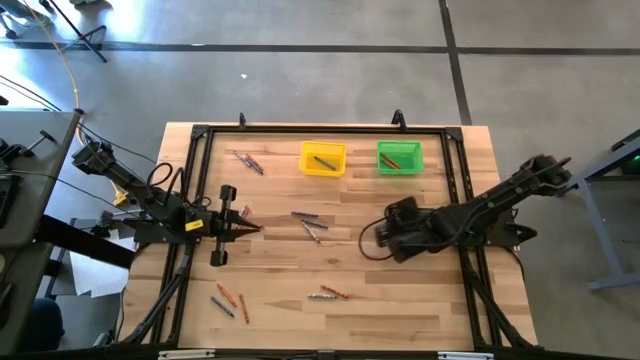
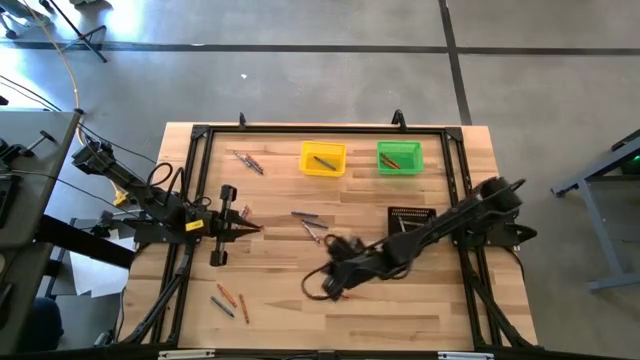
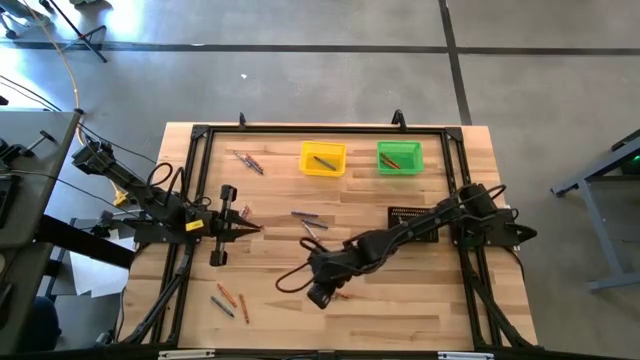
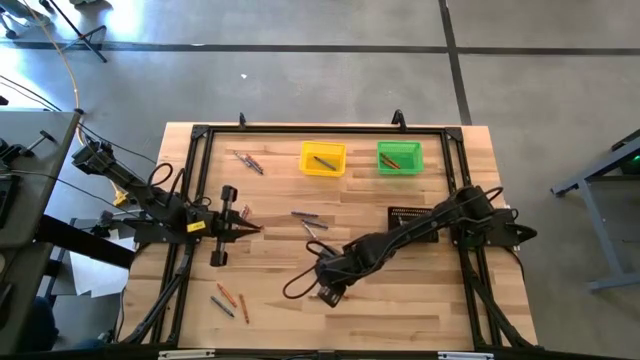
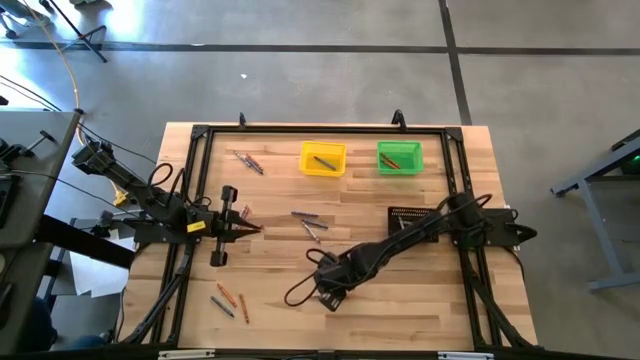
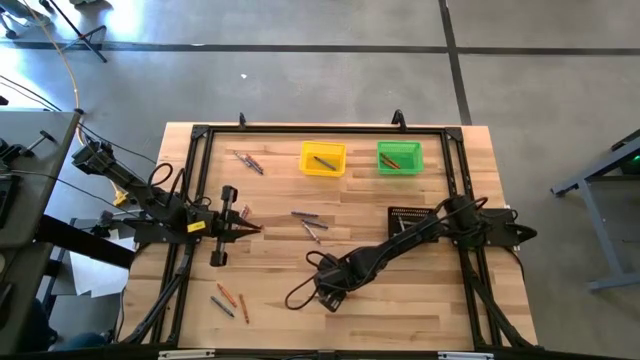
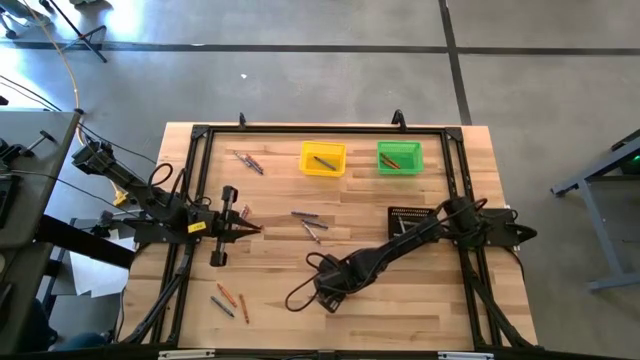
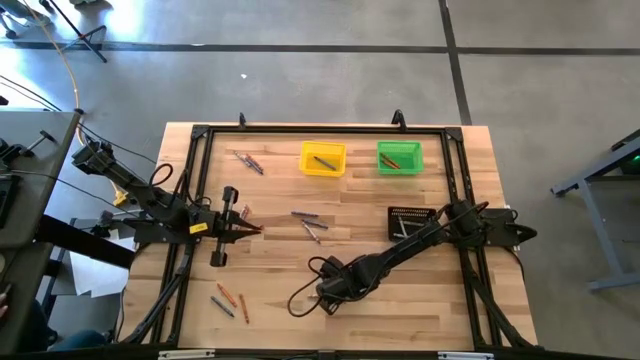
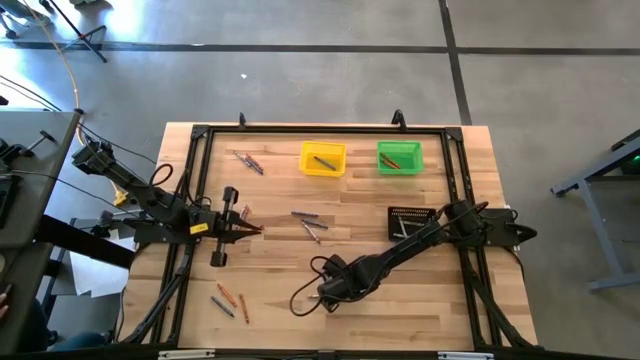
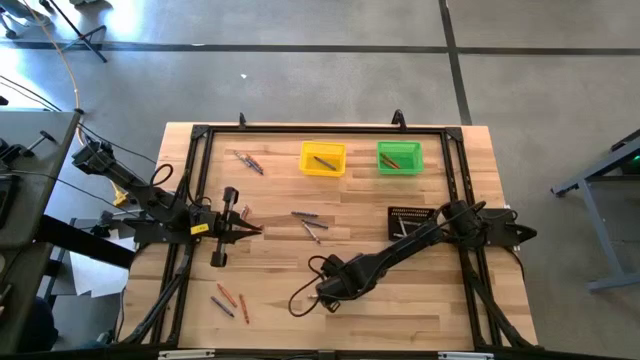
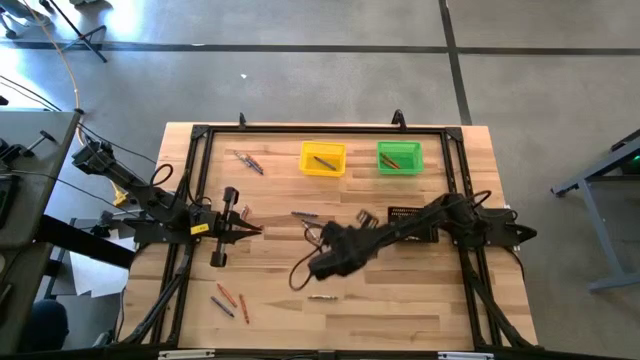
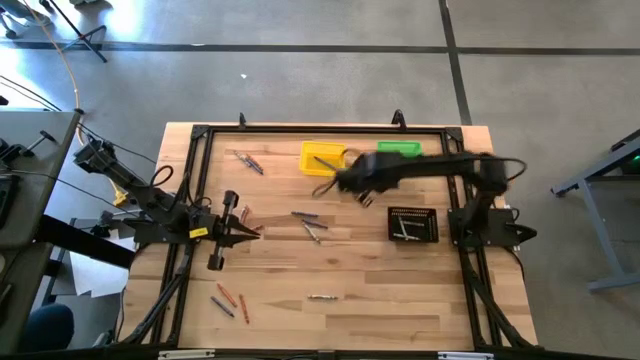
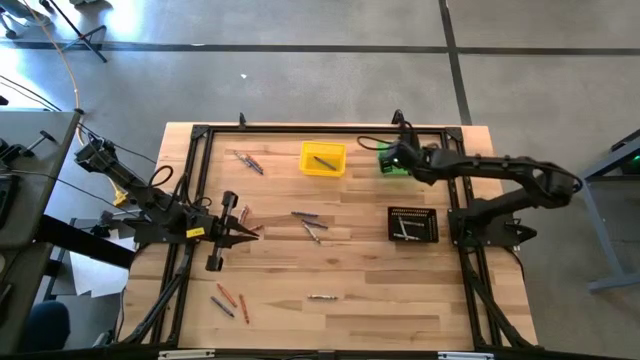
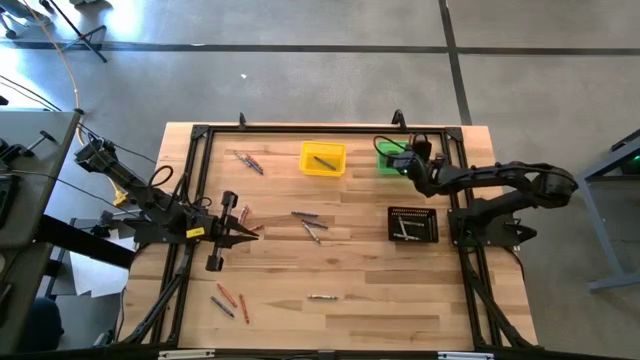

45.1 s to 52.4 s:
Task: Sort crayons
Put the orange crayon into the green bin

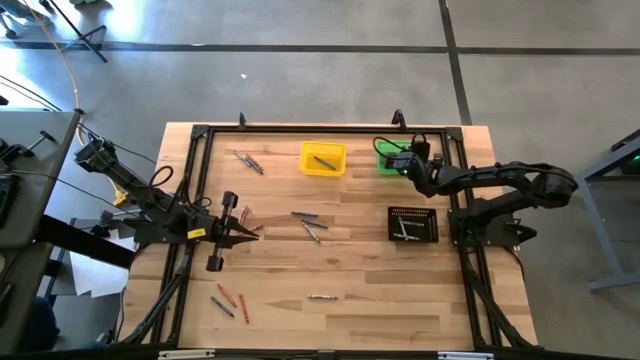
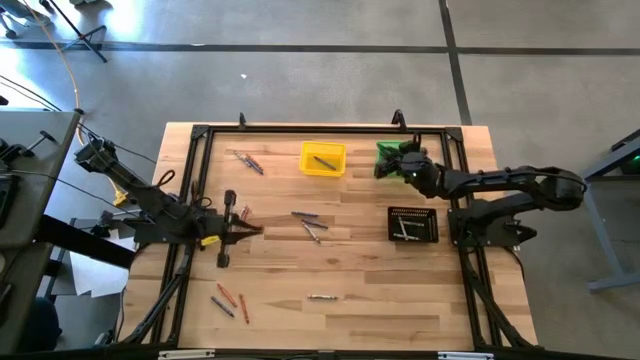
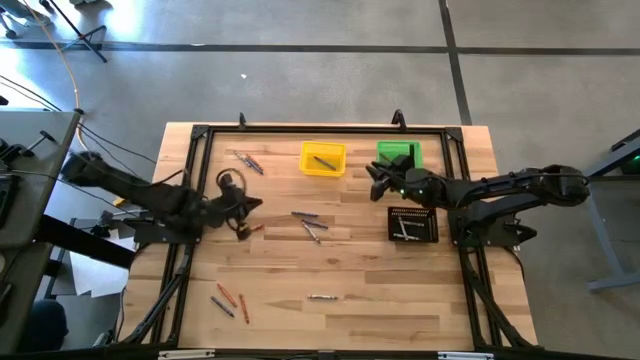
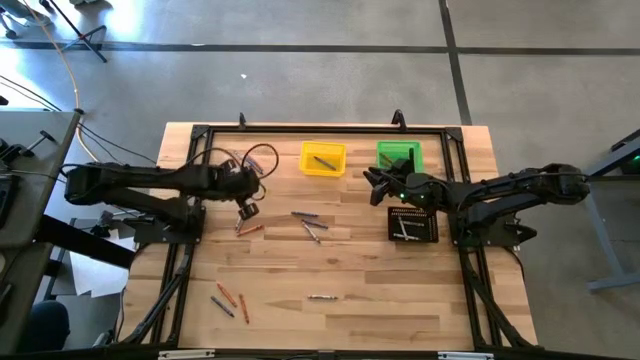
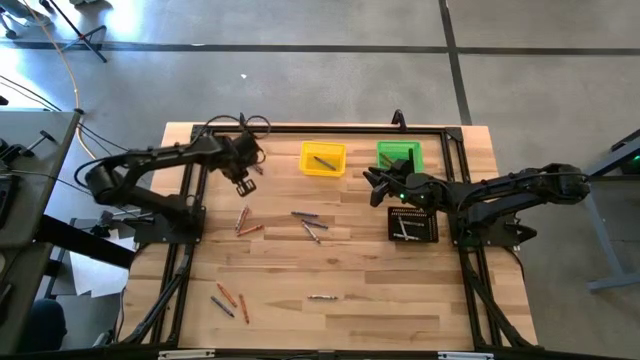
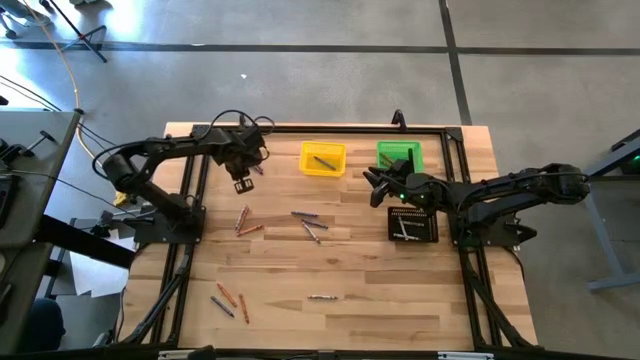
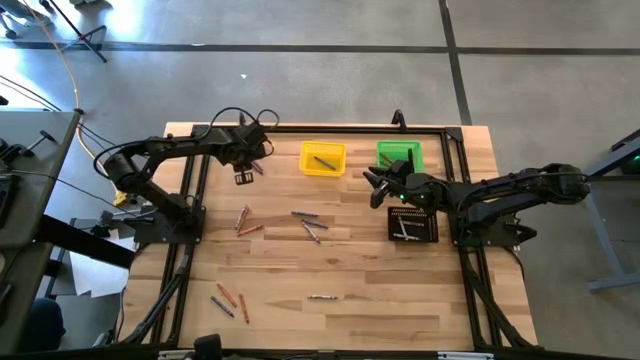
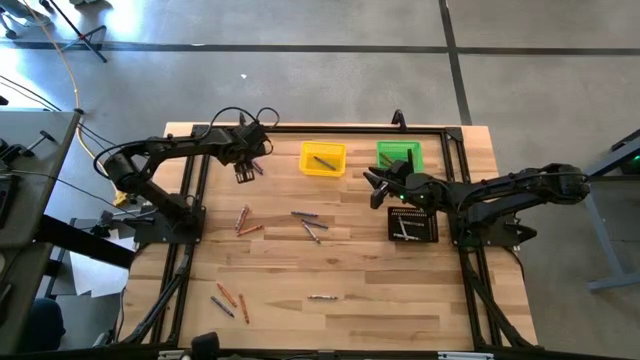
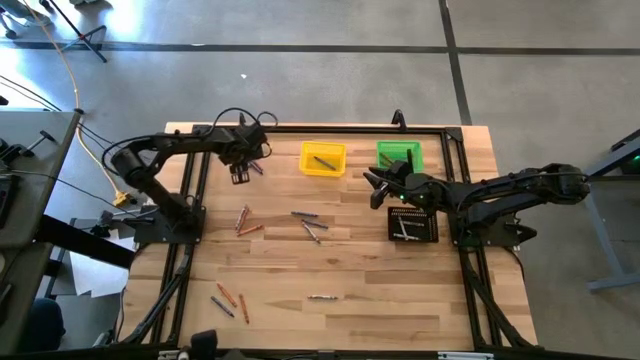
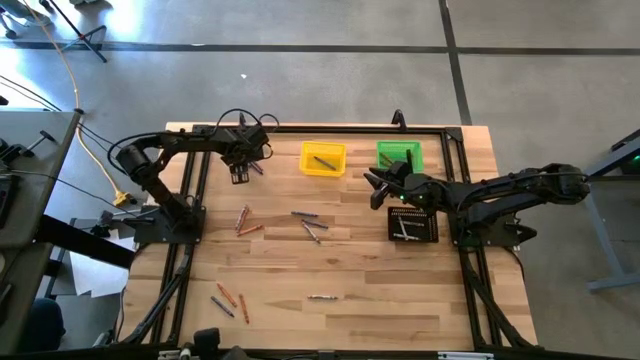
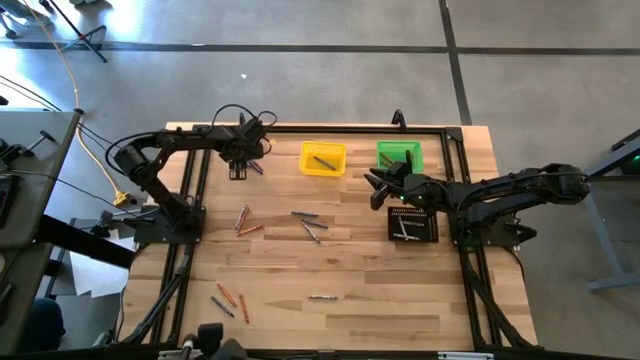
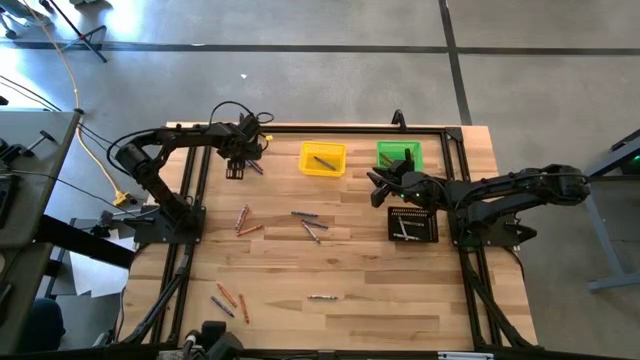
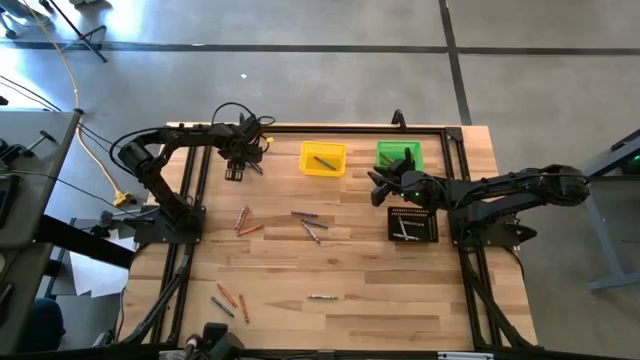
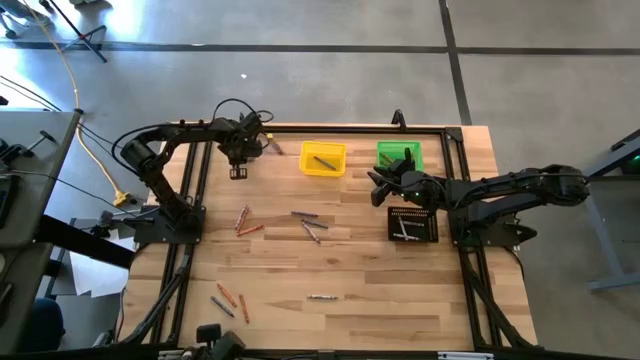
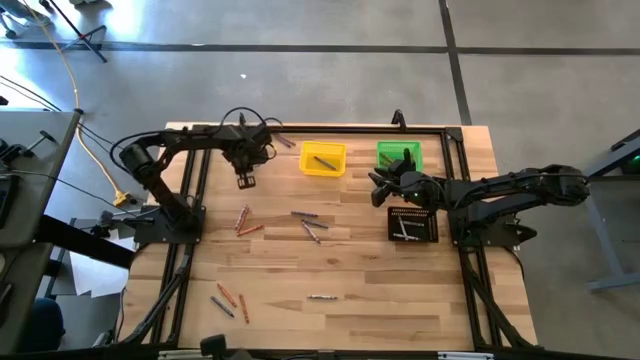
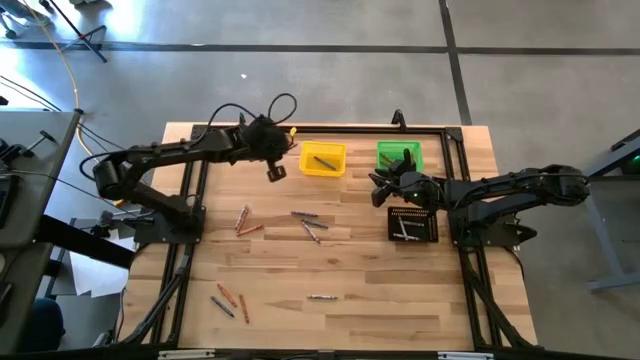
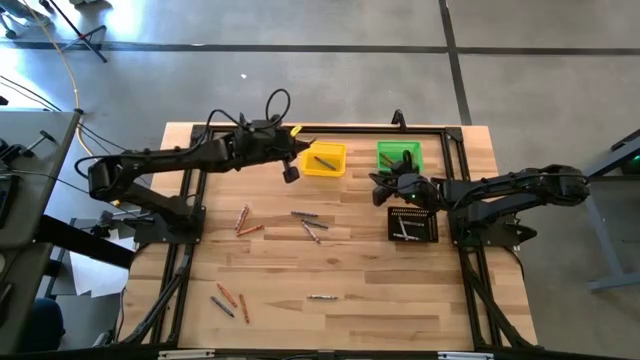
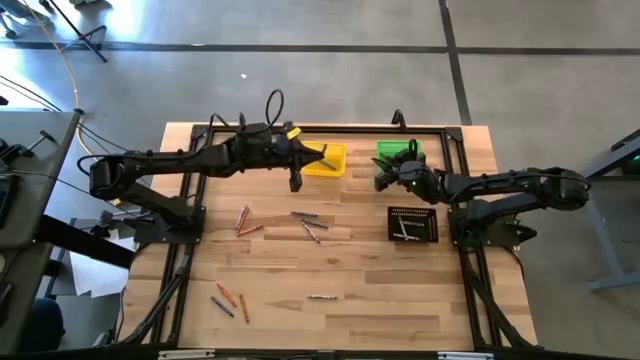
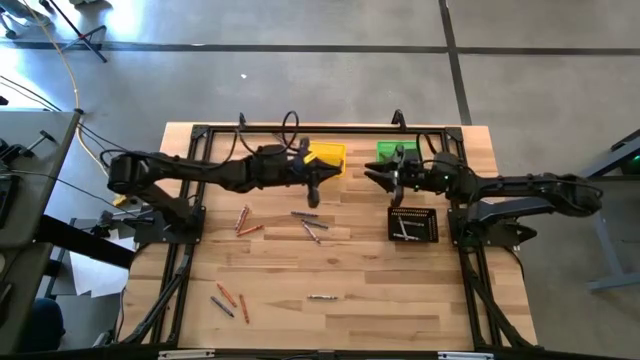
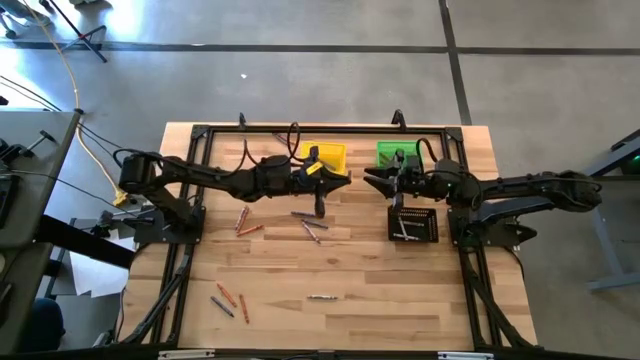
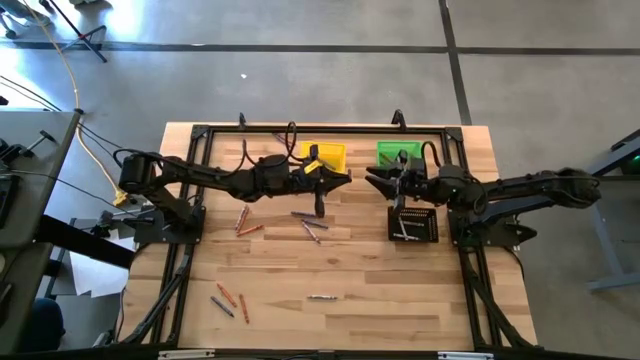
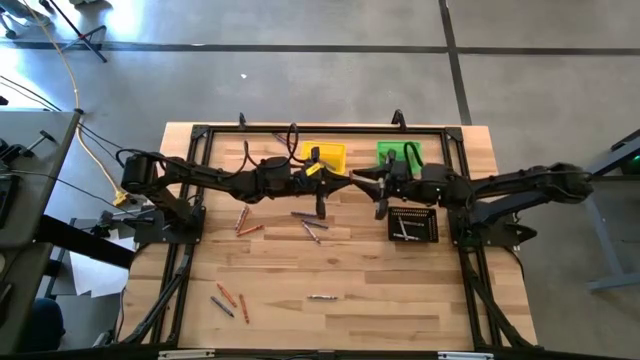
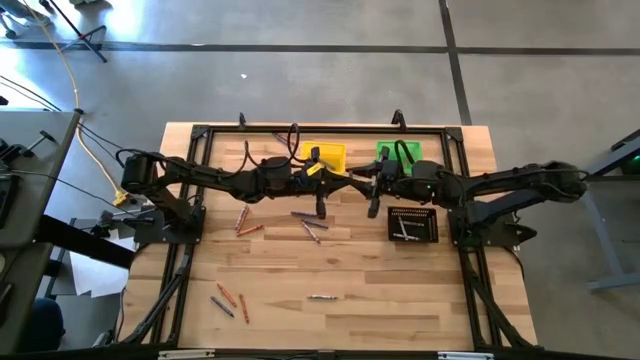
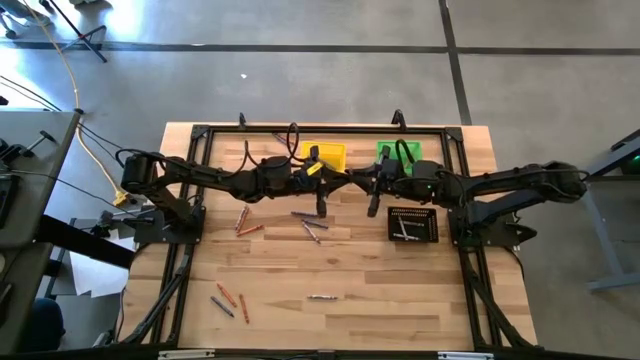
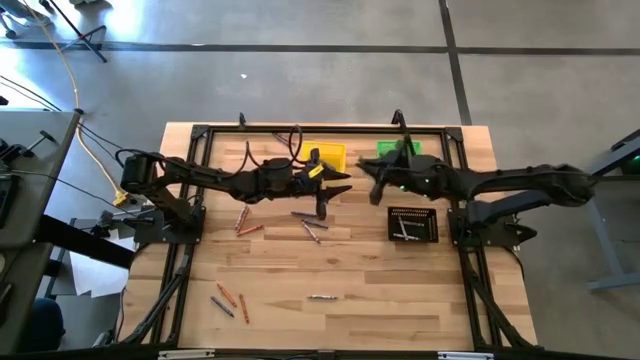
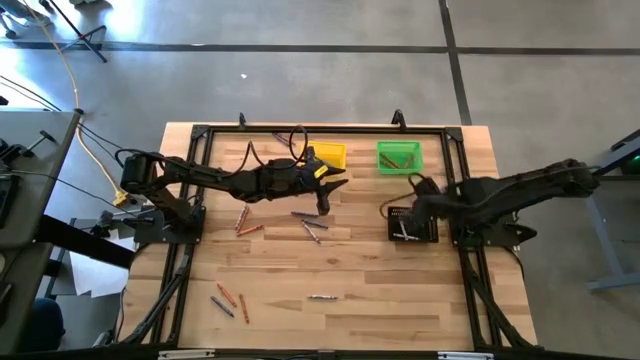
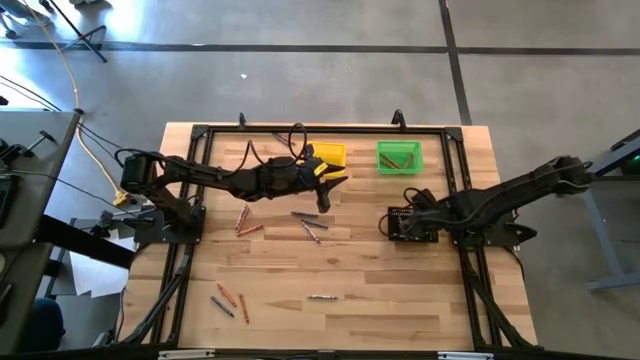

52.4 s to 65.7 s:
Put the gray crayon into the black bin
